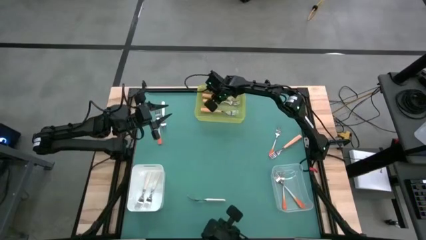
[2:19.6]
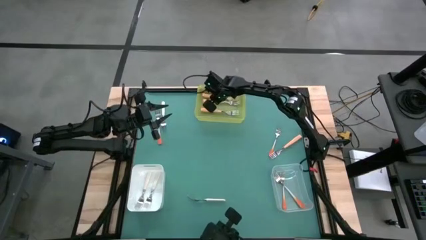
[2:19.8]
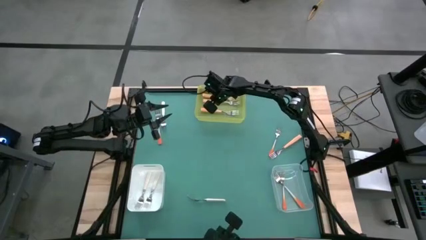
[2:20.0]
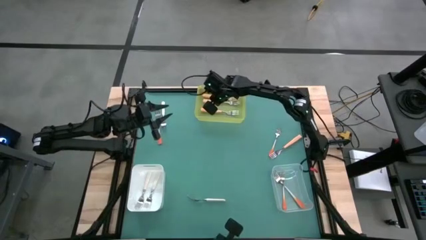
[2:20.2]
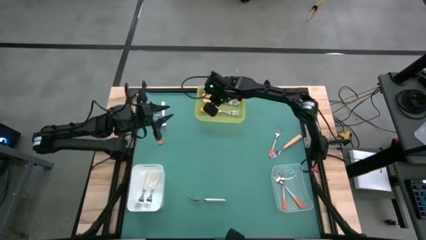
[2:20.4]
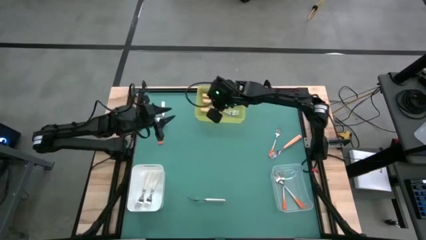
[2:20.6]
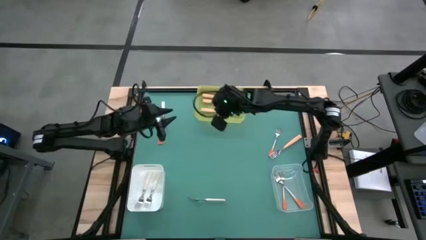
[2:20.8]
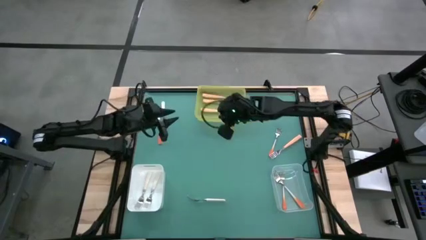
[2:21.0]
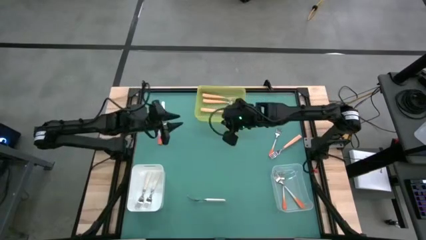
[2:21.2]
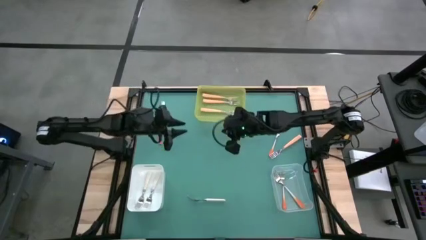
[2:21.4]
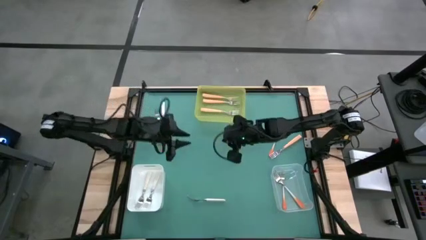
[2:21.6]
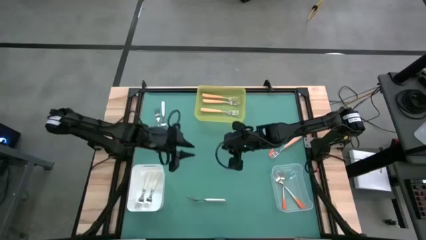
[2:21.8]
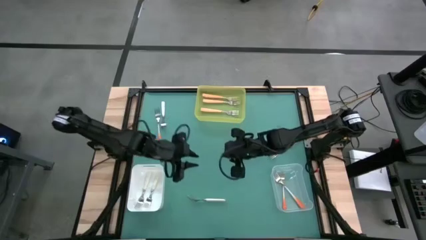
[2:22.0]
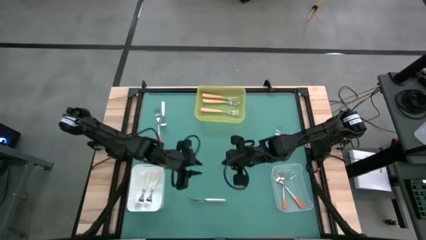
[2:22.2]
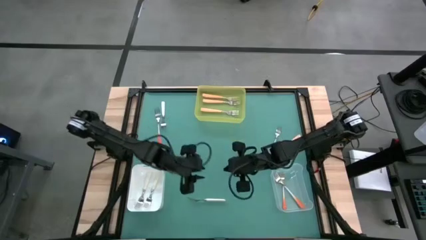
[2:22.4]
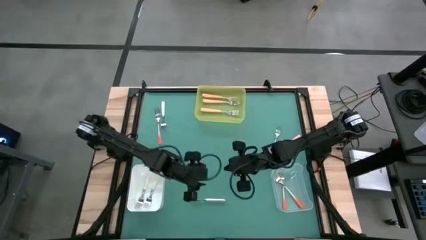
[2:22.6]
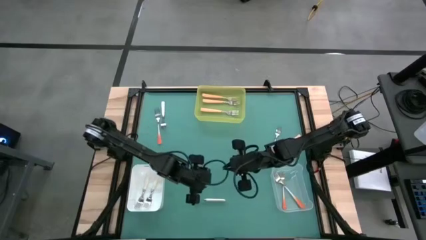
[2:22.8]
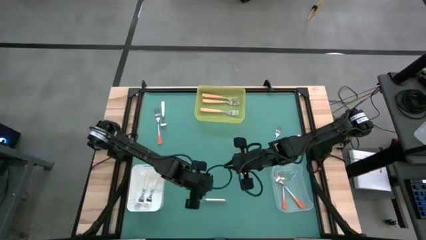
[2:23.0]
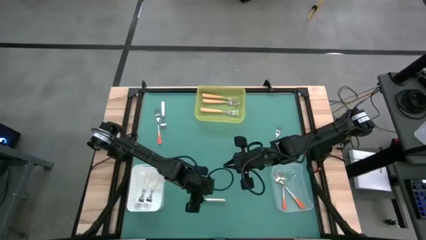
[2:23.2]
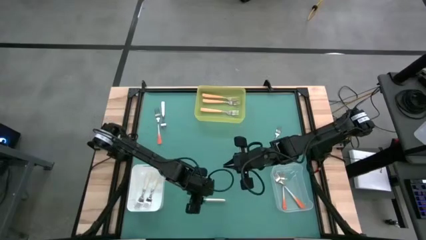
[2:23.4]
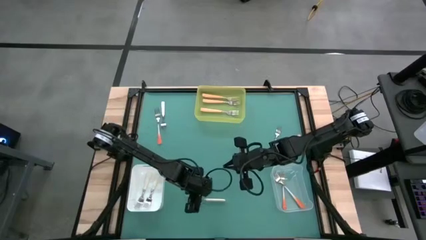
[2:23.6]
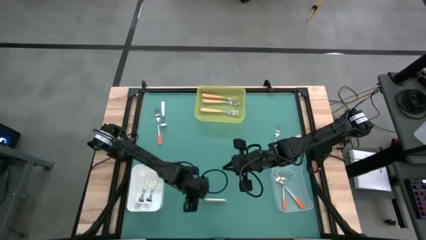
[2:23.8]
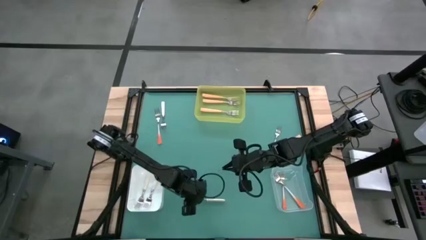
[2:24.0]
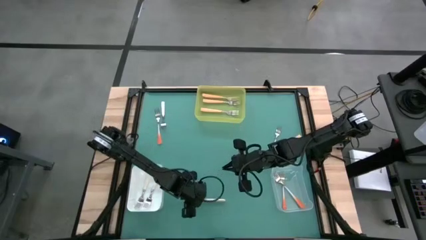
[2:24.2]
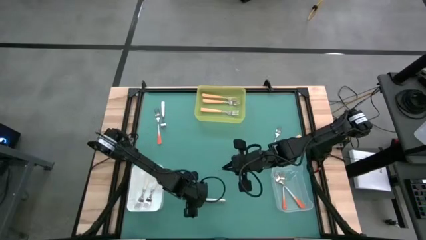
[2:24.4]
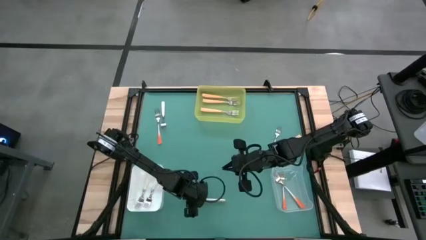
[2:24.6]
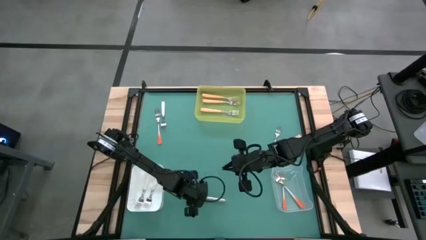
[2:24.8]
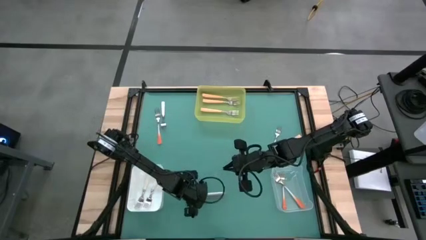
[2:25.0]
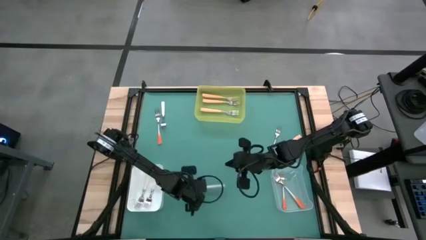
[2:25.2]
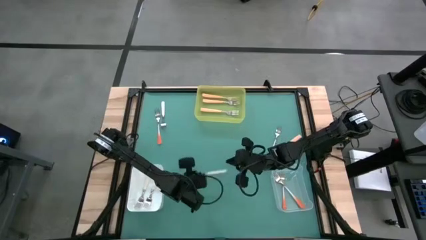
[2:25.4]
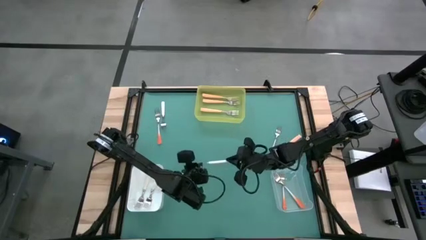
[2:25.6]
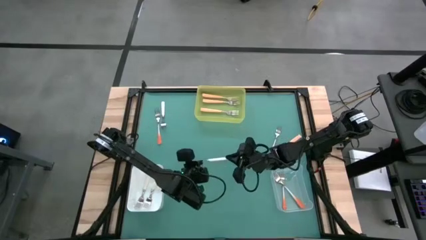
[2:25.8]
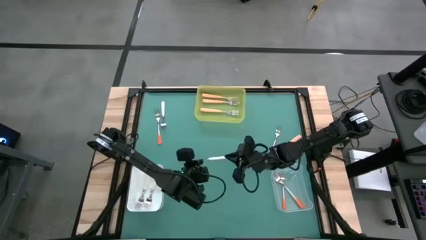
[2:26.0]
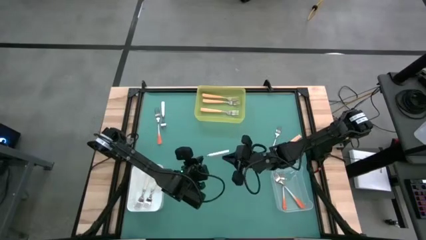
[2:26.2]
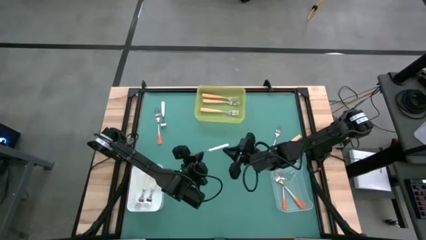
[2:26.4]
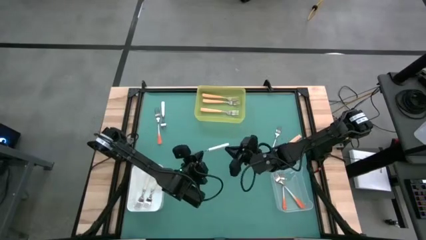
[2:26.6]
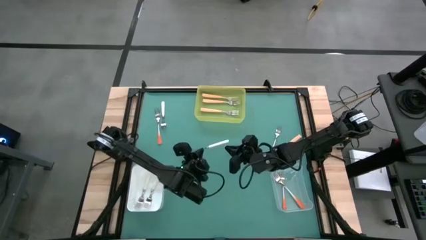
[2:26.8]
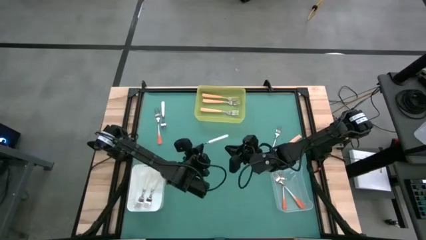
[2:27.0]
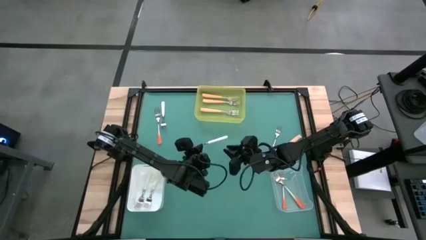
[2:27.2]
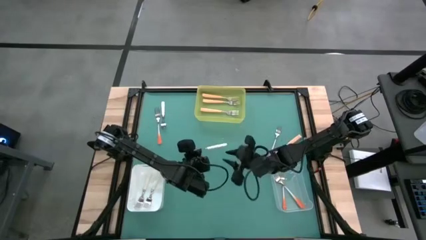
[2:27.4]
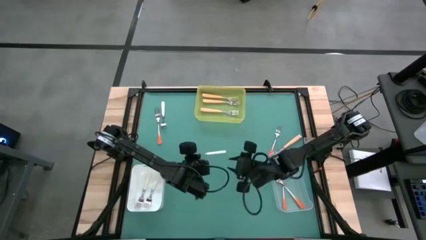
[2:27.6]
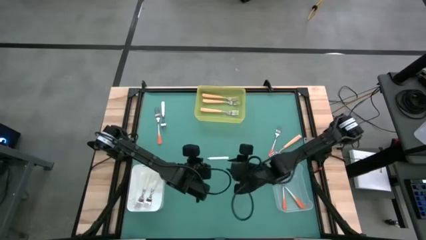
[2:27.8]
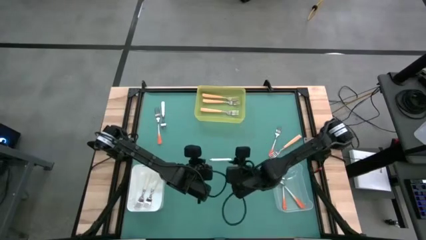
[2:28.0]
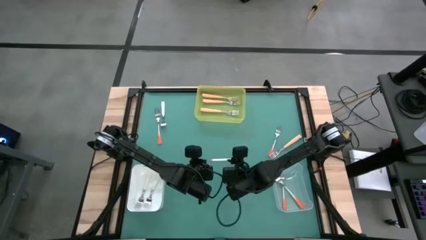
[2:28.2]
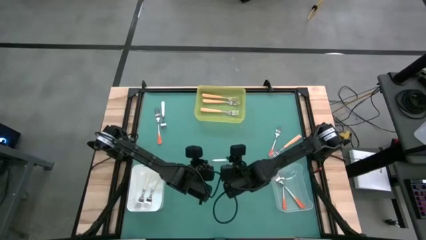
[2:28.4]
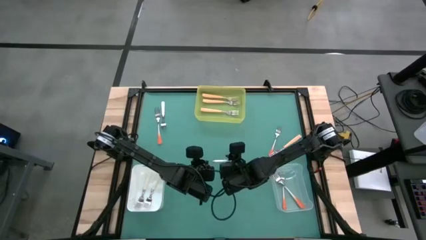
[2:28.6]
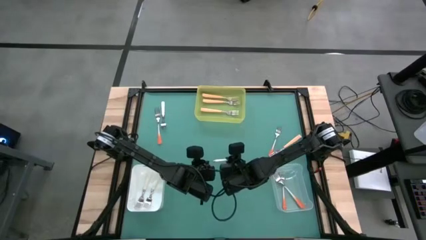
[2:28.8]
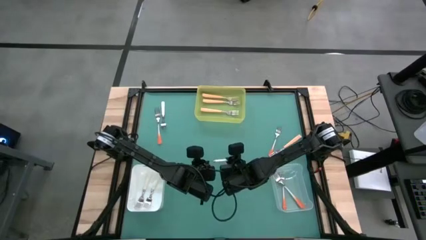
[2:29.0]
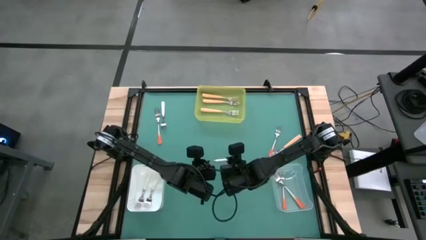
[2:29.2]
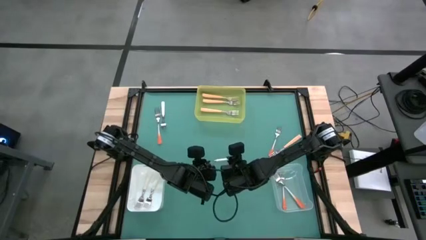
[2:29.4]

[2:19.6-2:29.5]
Task: Sort silverware by color (type)
Put the white fork into the white bin
